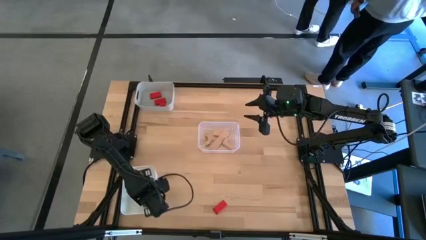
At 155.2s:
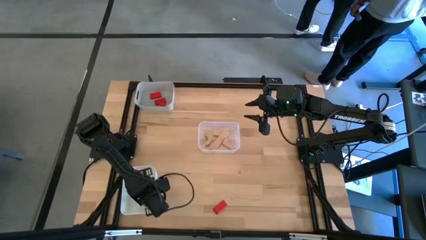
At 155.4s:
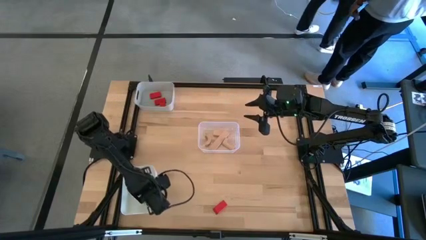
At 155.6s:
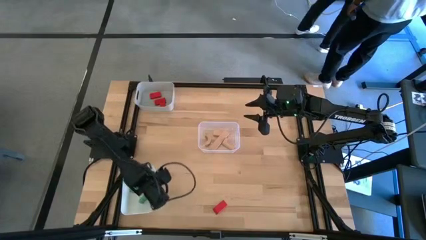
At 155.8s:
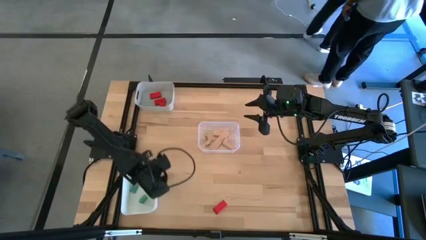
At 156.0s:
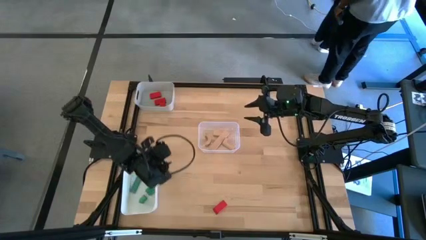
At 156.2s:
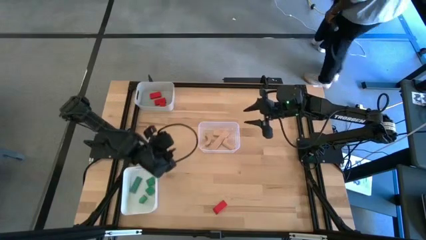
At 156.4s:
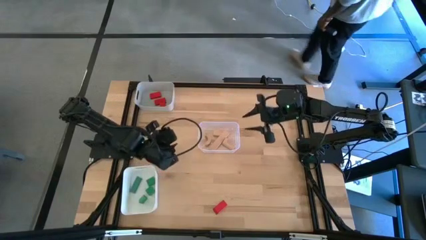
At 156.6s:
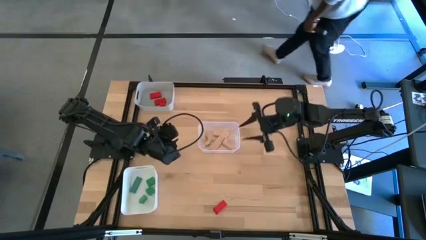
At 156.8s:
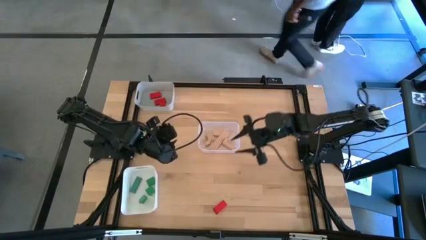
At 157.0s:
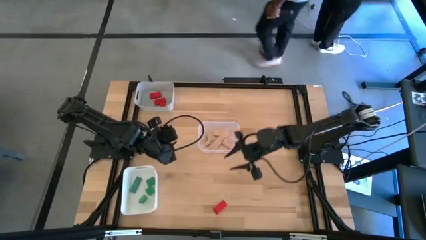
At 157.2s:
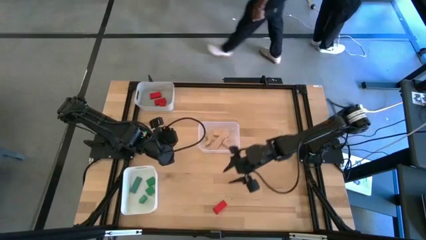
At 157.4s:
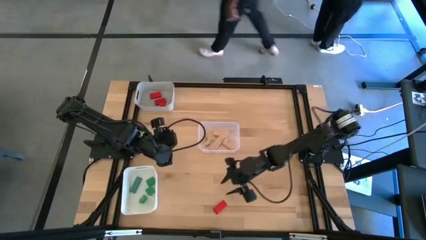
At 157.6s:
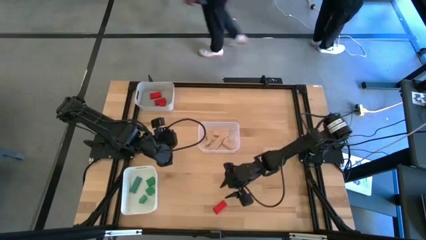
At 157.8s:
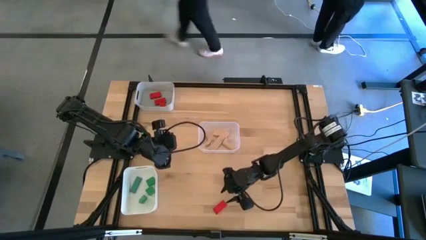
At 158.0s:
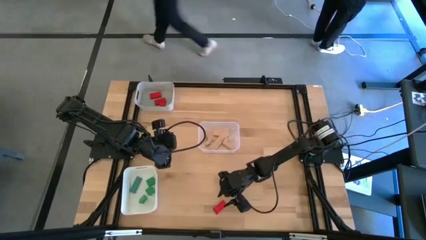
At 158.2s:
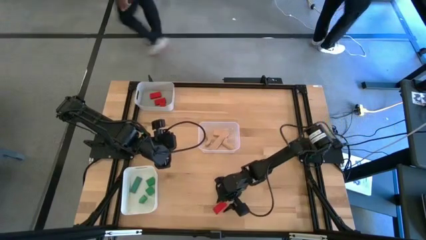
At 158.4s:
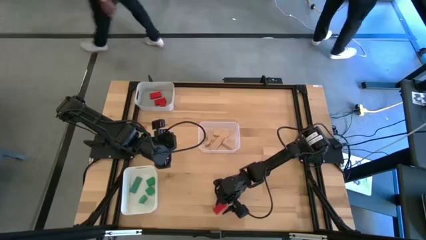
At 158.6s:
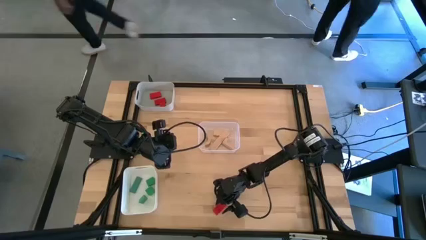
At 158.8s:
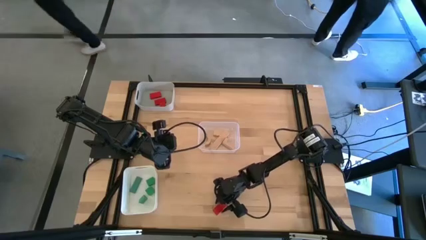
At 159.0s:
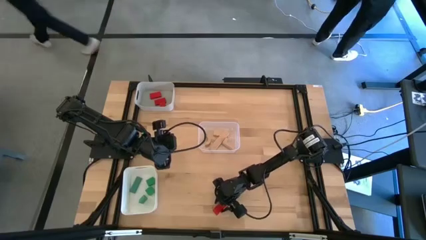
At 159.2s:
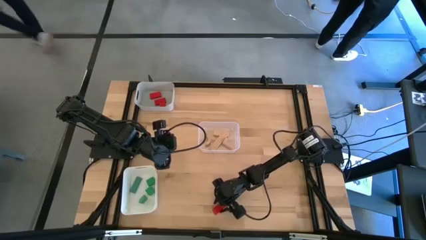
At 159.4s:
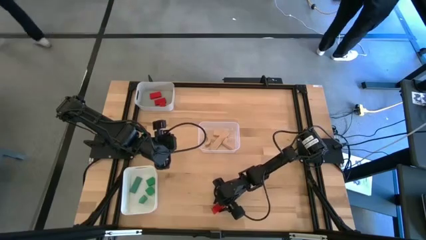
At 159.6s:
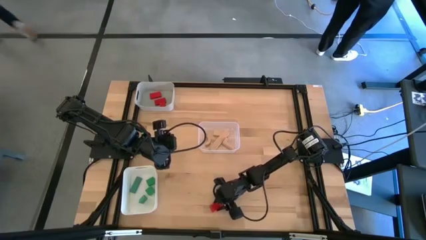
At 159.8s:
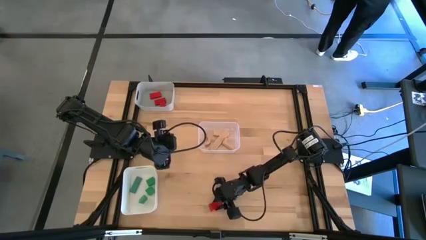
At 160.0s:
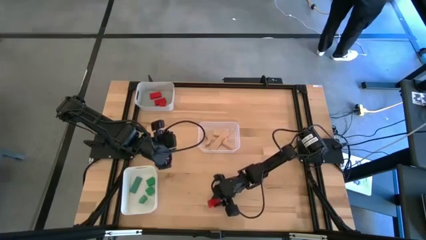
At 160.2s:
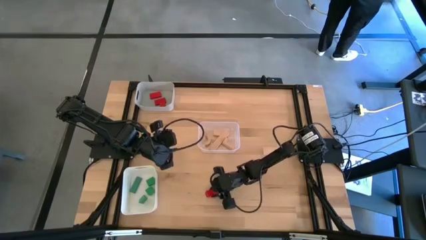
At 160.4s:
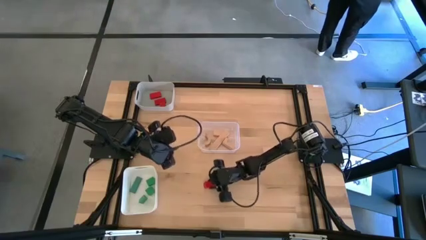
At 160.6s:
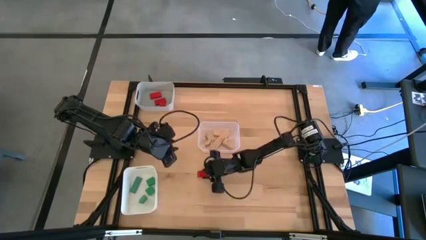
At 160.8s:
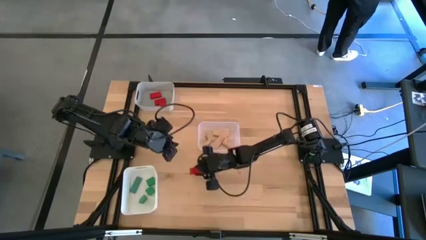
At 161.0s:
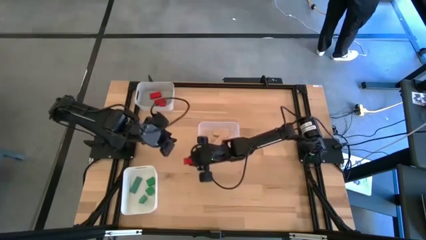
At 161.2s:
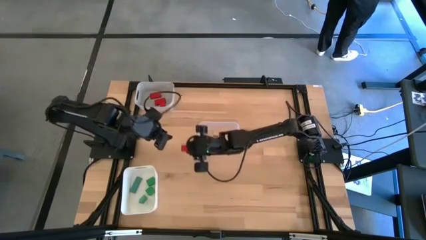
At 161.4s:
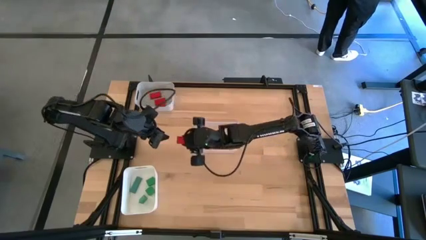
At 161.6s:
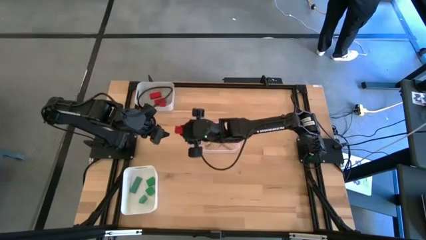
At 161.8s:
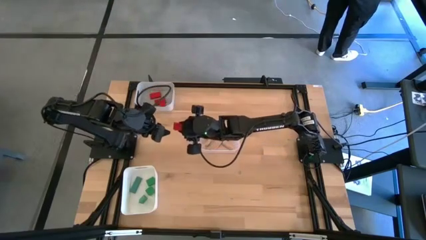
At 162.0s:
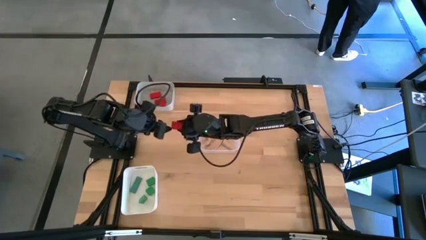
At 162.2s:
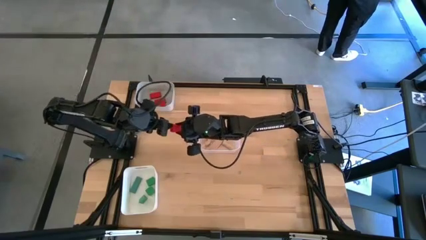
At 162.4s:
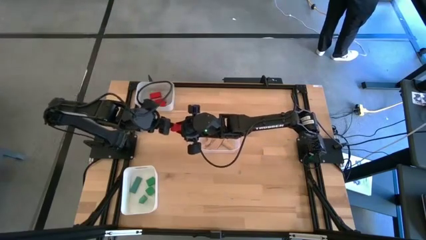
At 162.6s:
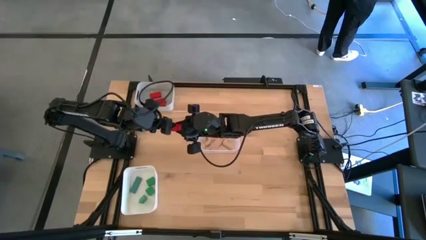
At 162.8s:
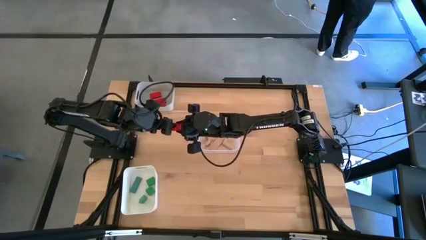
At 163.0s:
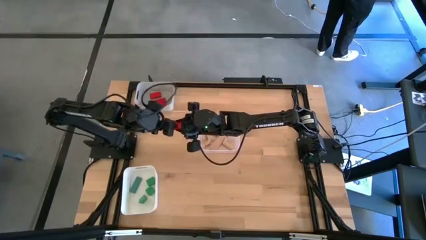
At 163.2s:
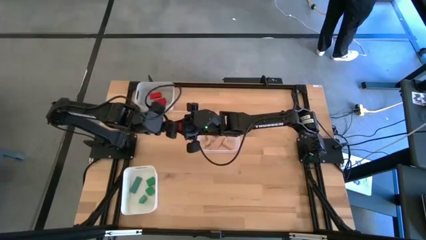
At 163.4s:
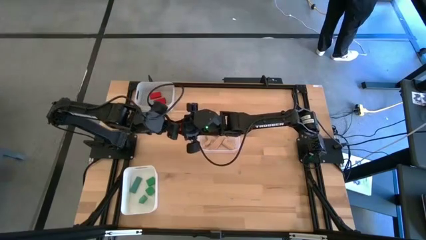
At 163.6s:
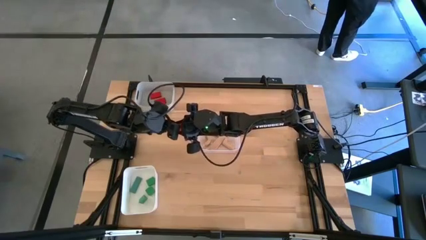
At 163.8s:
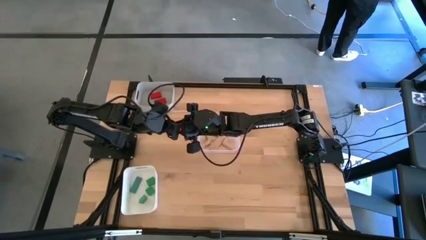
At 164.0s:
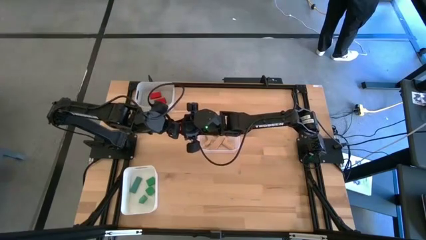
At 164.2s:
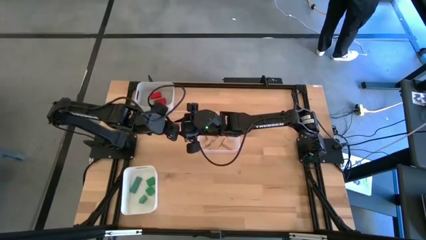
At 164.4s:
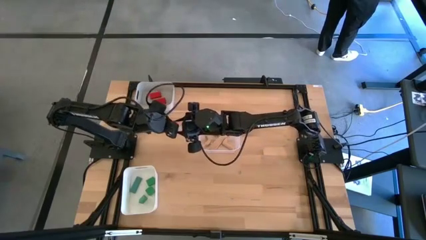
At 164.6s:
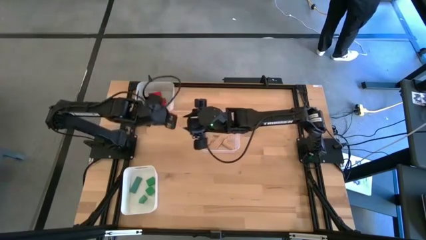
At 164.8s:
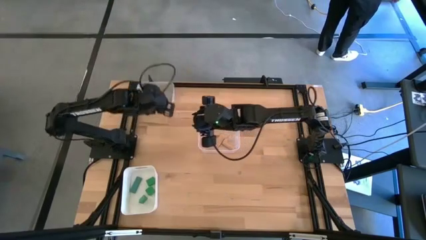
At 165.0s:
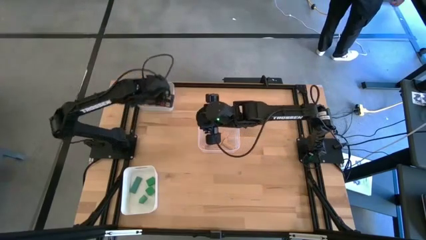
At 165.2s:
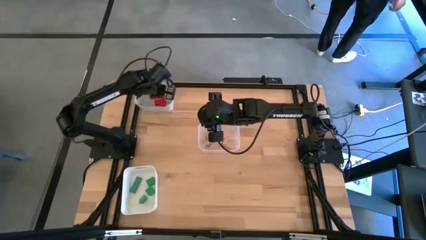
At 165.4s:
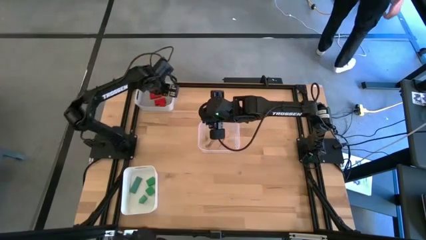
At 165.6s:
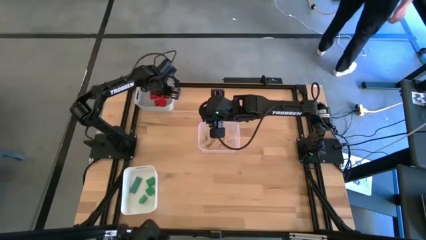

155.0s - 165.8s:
Task: Sort & place blocks by color
Put the red block into the gray bin

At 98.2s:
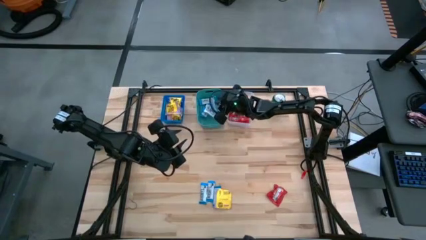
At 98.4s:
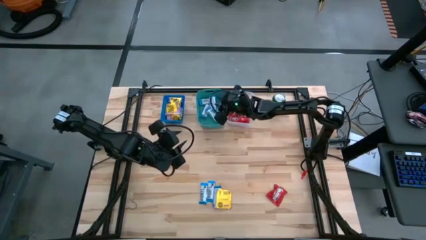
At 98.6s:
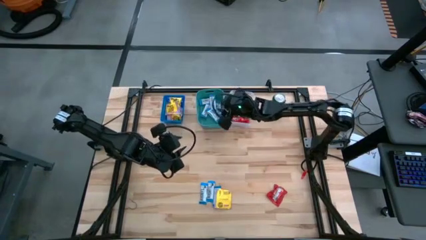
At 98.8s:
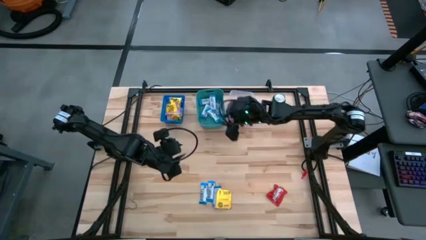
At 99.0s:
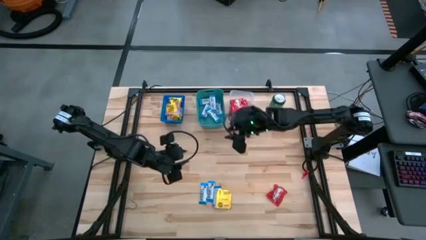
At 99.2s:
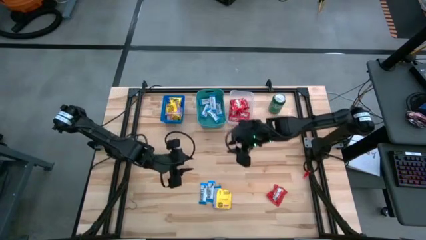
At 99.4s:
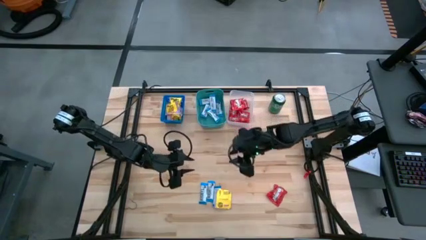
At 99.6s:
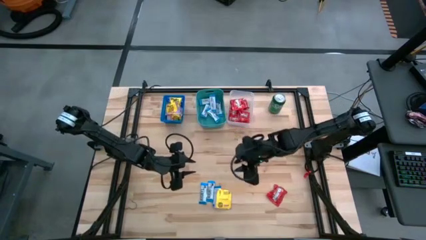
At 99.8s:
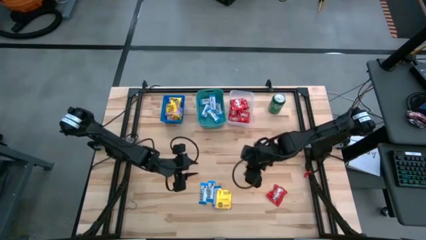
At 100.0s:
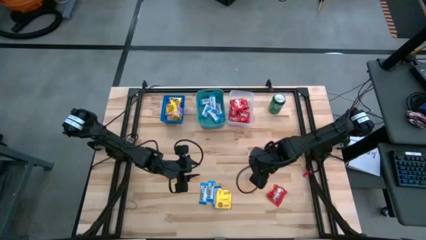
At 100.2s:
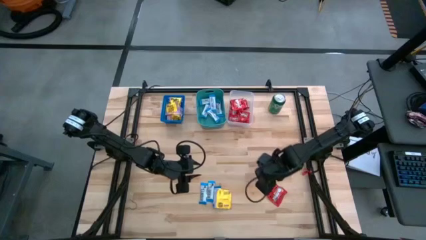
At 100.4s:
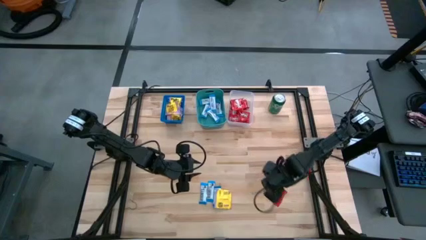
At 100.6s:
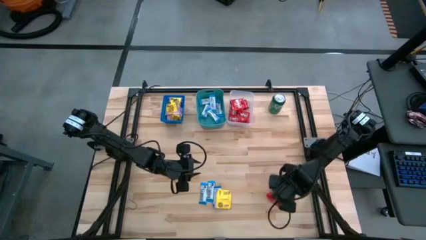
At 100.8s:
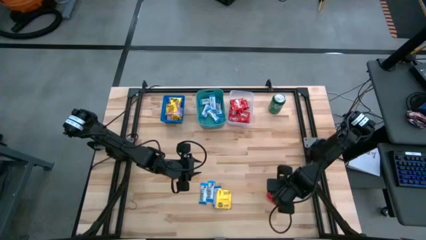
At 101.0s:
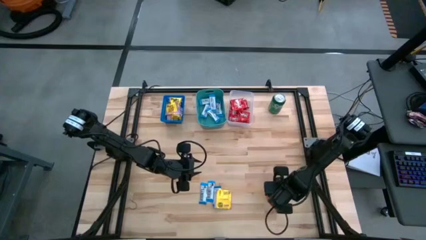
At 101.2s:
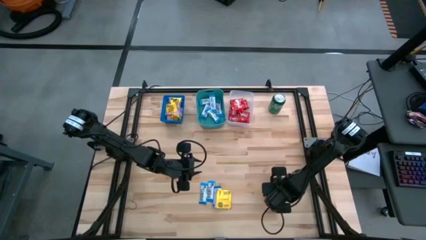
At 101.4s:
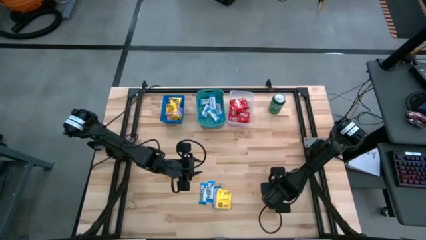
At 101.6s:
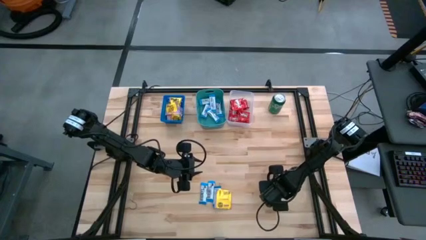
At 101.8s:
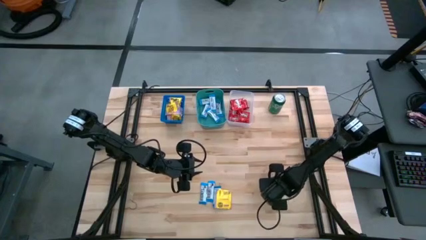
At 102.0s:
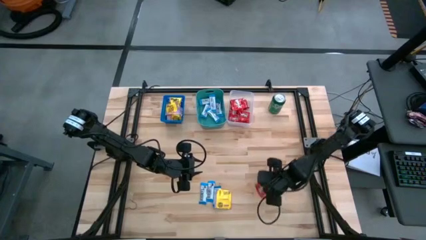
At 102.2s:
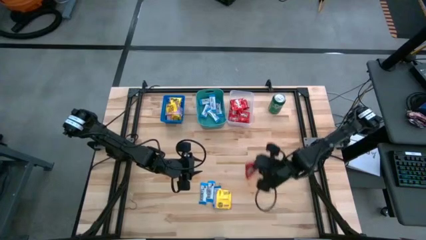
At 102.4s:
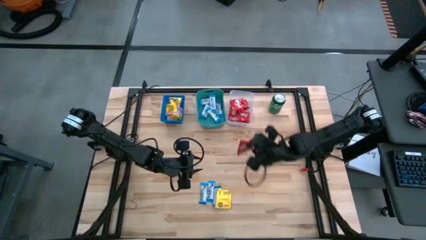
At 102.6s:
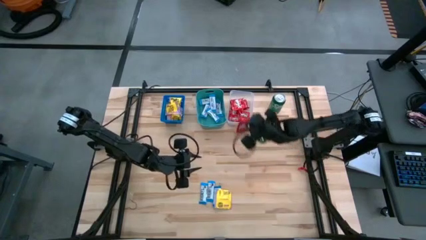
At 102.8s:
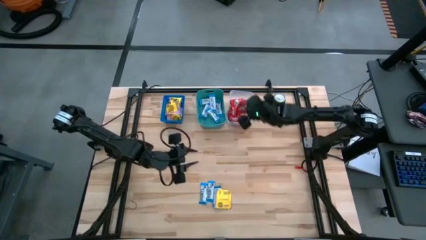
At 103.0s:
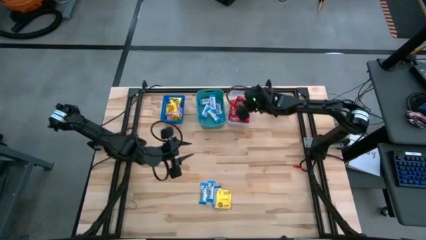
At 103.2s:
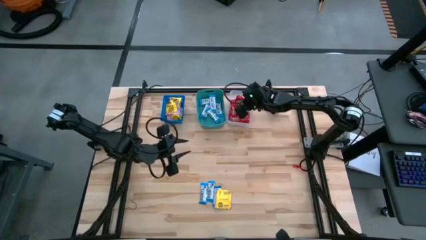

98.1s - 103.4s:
Task: Sort candy
Put the red candy into the transparent bin
